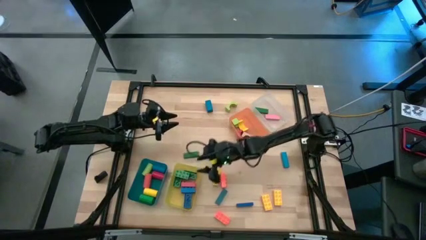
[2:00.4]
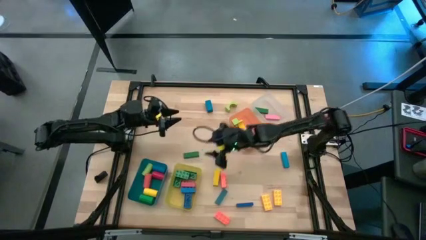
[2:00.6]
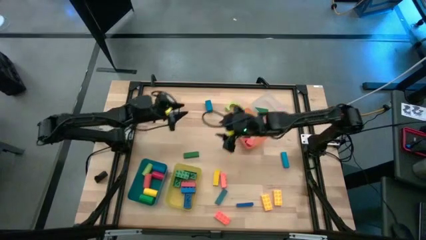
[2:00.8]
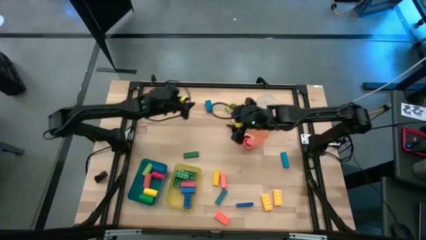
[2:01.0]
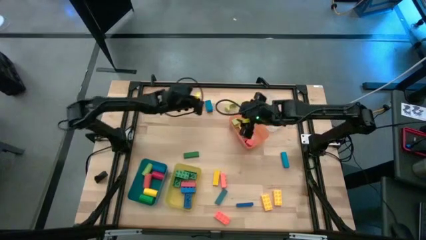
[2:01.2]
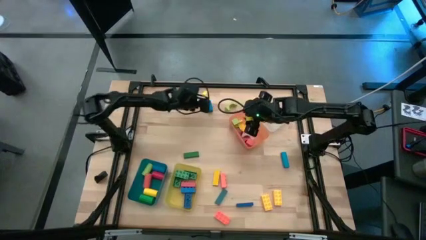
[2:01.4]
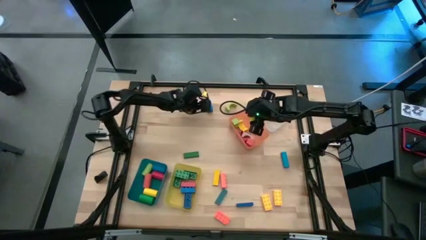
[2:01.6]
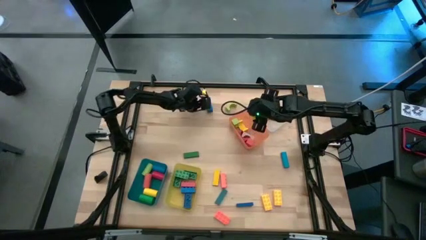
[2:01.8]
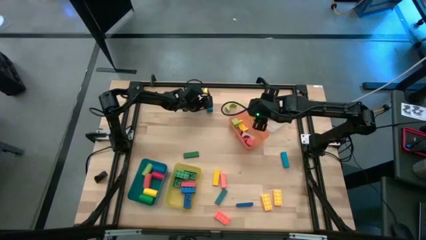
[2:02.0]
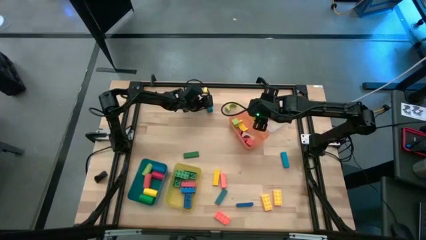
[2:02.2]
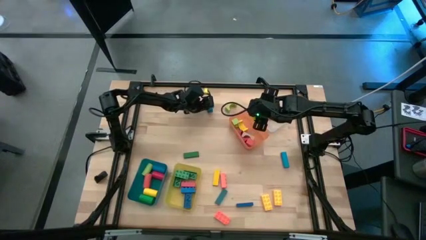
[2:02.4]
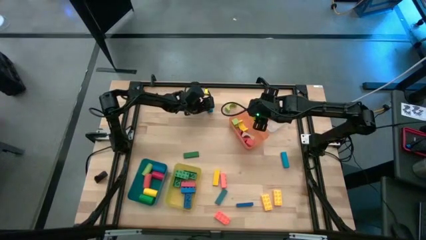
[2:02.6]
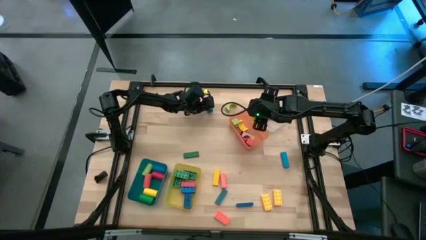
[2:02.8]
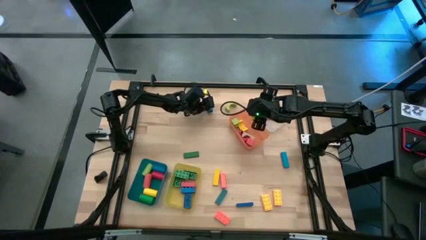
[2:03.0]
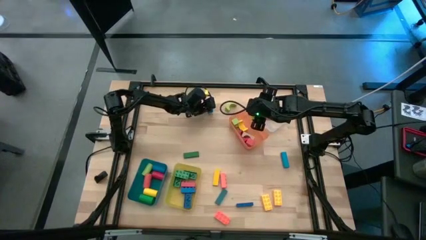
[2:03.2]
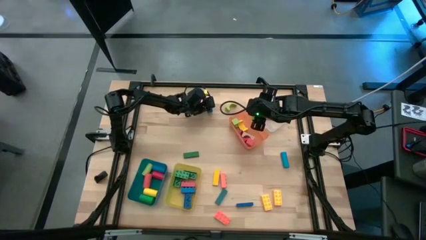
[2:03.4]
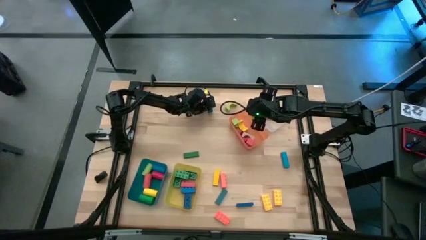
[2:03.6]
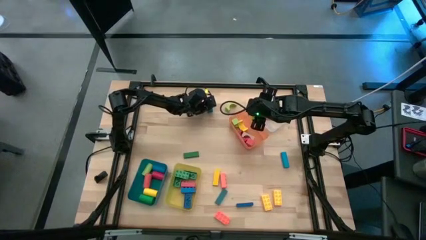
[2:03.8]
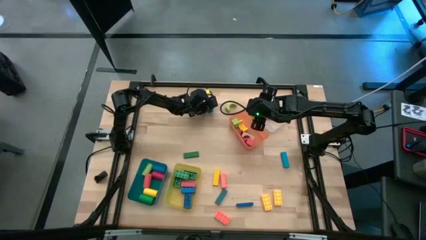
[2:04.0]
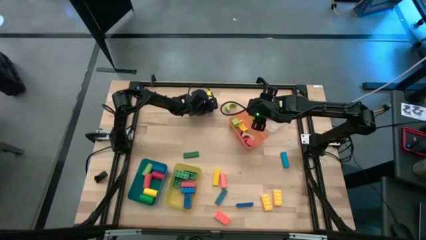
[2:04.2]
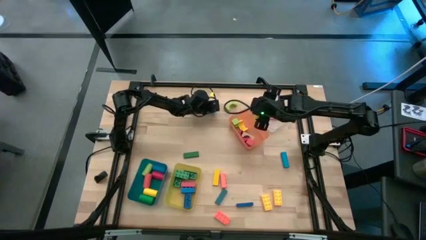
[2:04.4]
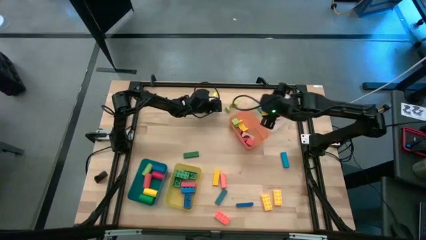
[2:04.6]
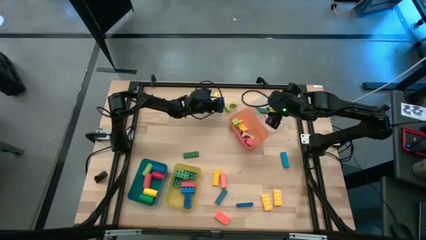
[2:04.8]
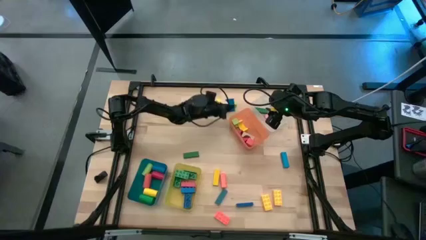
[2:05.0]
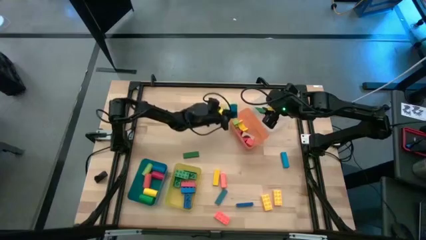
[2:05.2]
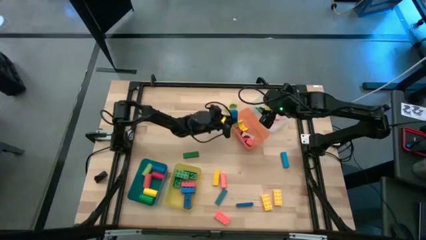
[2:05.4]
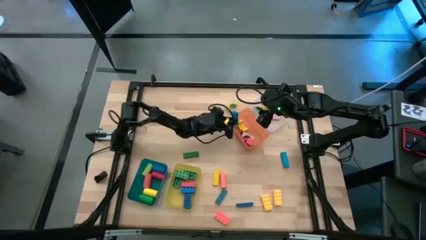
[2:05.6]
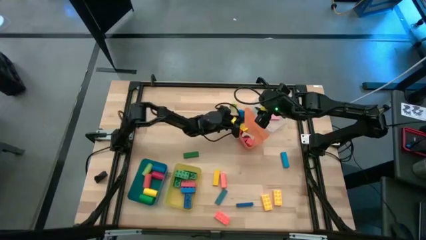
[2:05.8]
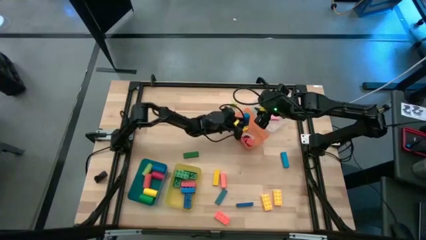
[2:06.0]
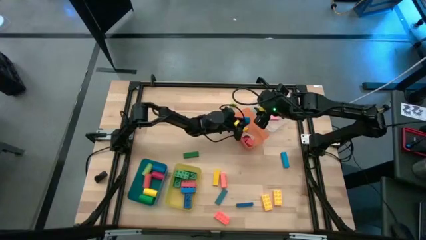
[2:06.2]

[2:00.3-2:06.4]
Task: Sort blocks by size
Put the blue arch block into the orange bin

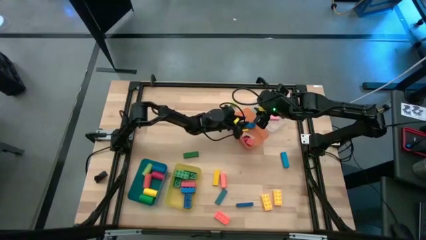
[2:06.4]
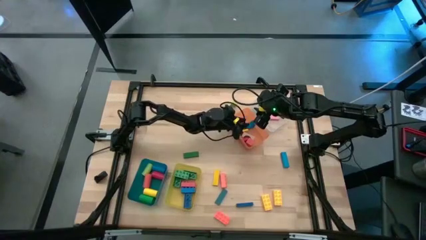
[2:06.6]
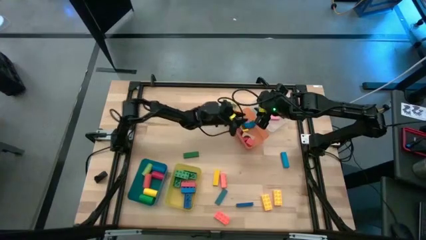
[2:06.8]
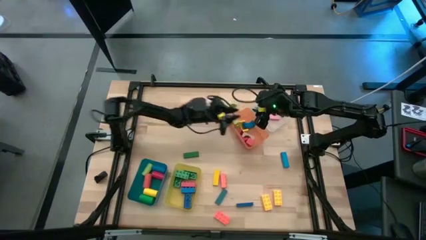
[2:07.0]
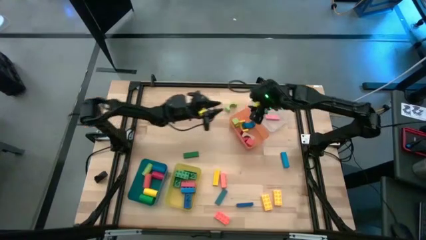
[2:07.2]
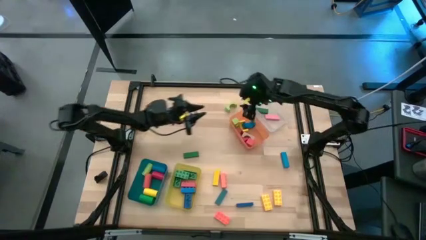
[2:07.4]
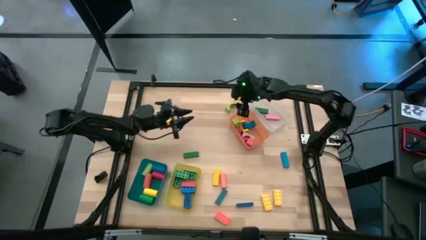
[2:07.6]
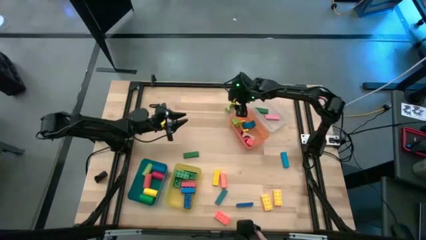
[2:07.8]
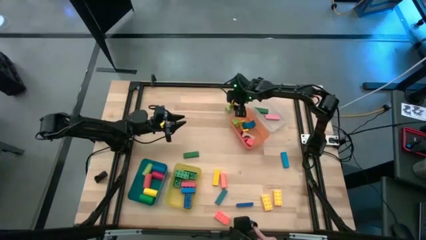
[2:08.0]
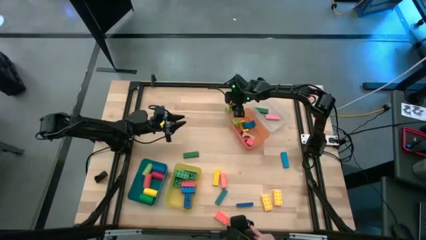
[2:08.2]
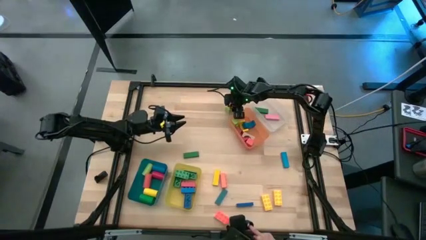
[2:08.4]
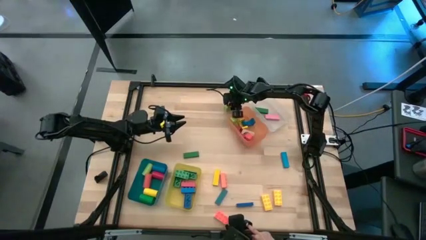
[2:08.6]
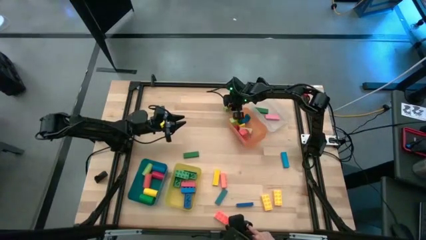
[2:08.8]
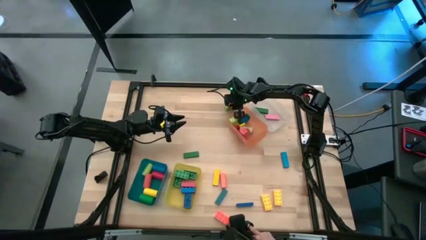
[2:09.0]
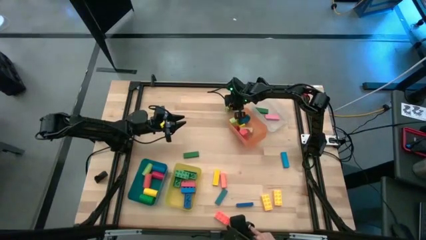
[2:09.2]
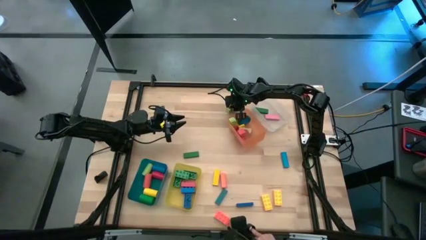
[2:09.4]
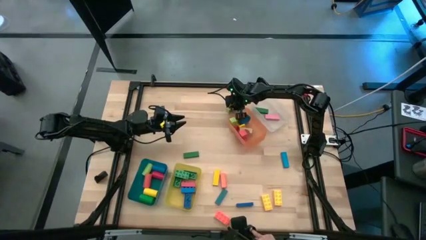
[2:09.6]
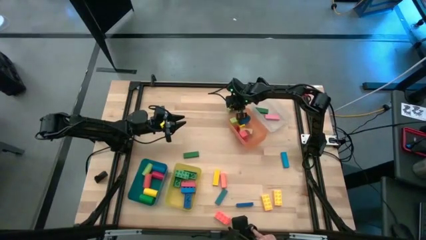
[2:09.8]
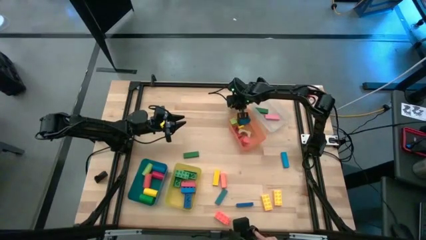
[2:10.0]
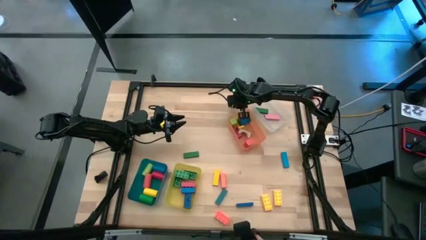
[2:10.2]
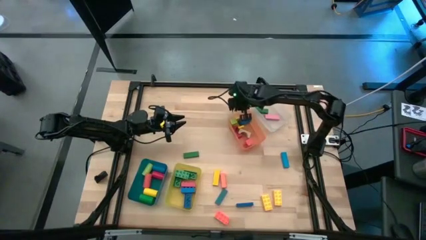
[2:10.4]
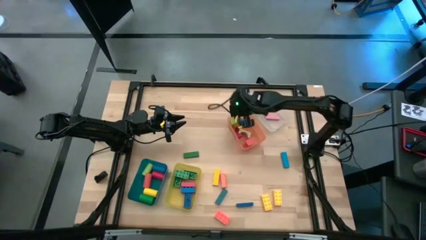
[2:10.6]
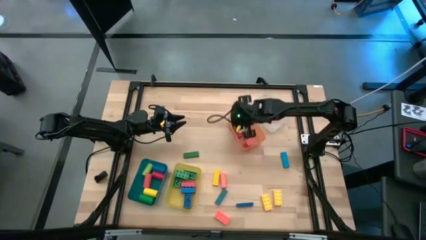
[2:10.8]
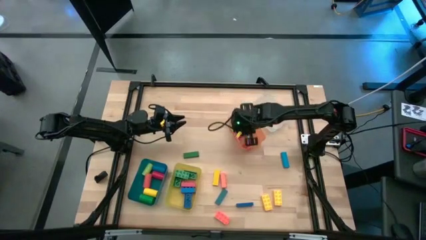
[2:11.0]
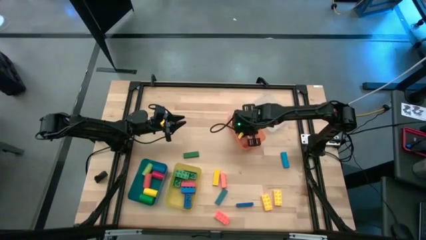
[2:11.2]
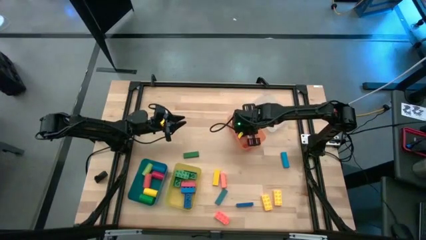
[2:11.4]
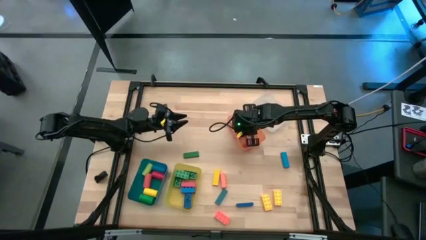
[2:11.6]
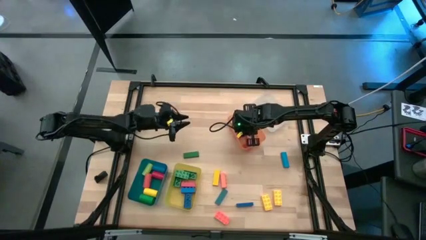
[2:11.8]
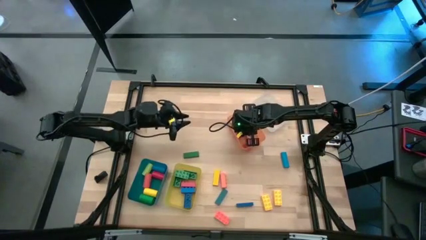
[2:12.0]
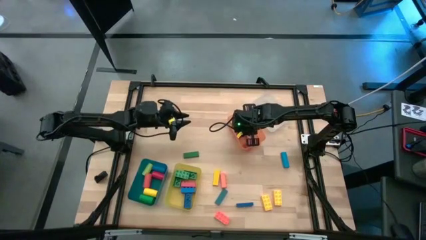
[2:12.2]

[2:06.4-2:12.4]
Put the light green arch block into the orange bin

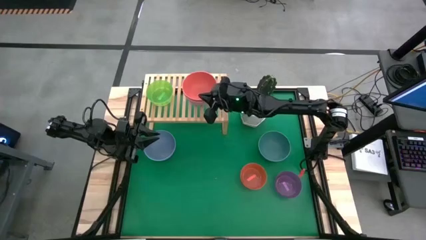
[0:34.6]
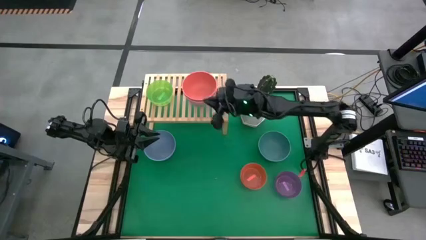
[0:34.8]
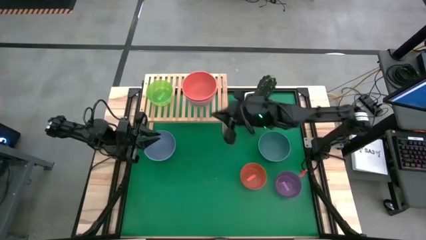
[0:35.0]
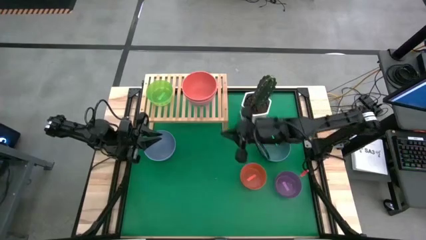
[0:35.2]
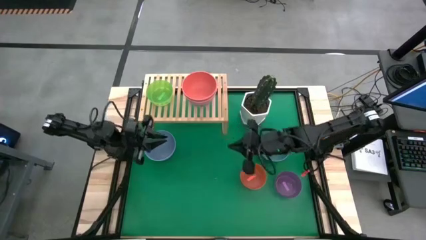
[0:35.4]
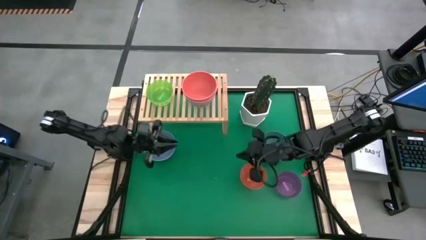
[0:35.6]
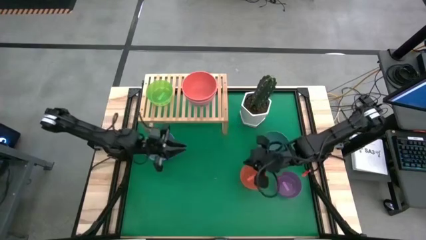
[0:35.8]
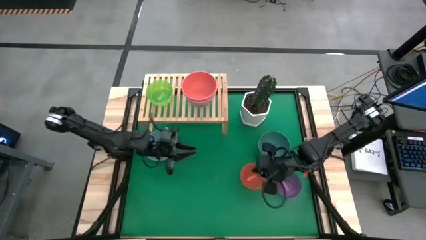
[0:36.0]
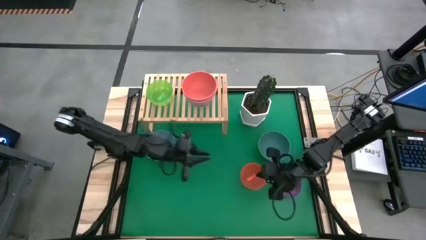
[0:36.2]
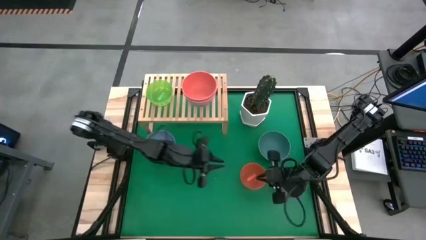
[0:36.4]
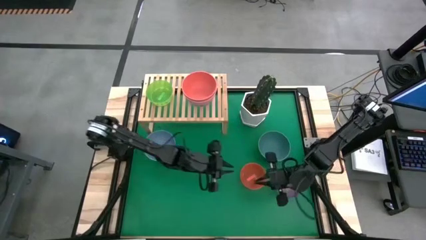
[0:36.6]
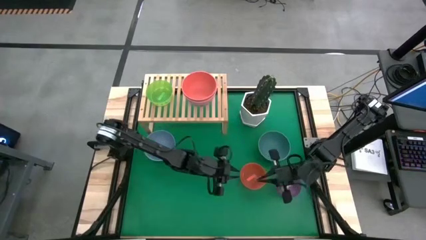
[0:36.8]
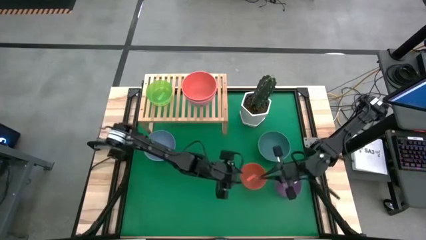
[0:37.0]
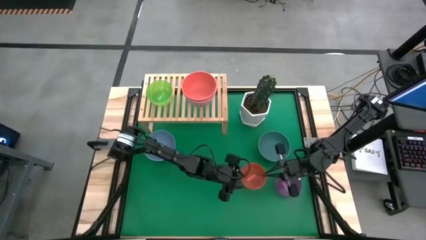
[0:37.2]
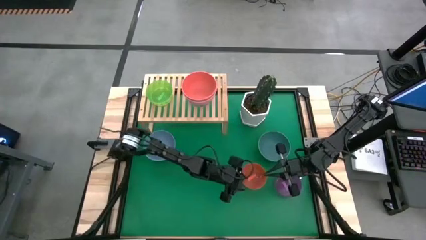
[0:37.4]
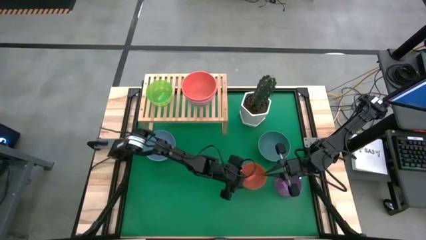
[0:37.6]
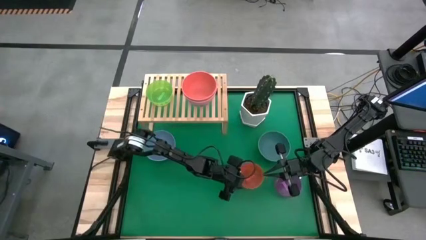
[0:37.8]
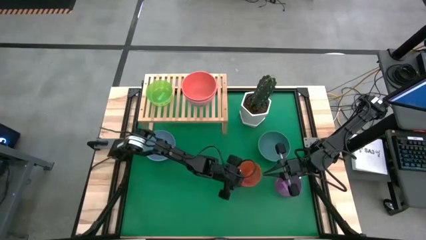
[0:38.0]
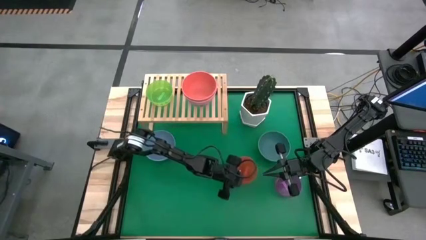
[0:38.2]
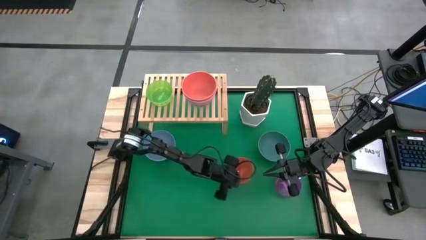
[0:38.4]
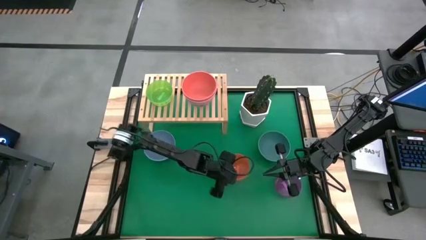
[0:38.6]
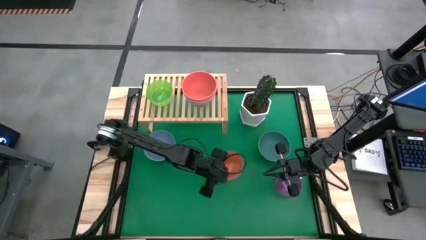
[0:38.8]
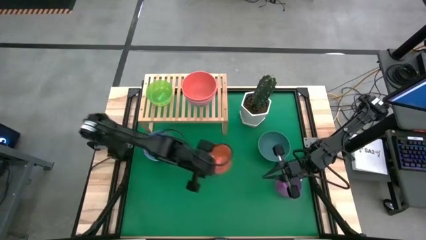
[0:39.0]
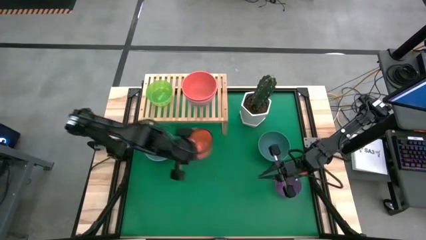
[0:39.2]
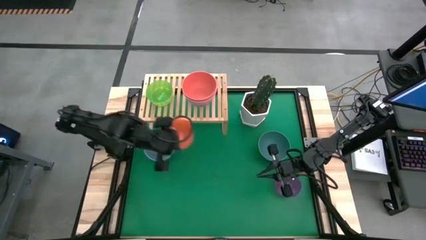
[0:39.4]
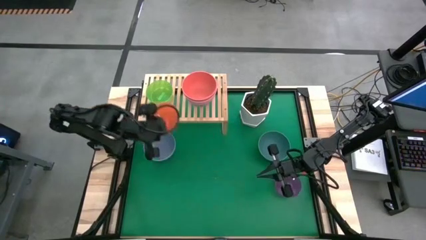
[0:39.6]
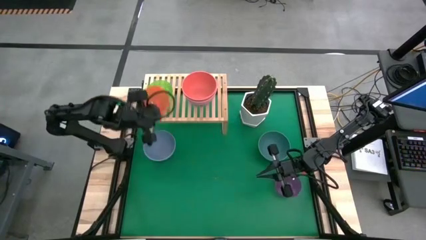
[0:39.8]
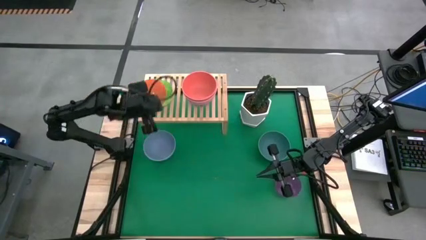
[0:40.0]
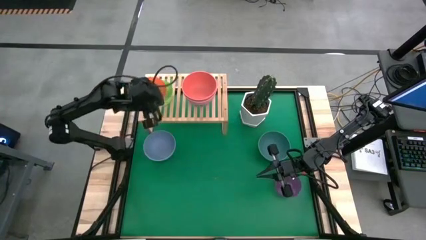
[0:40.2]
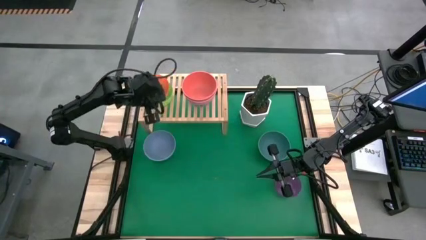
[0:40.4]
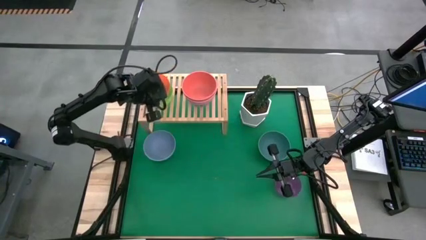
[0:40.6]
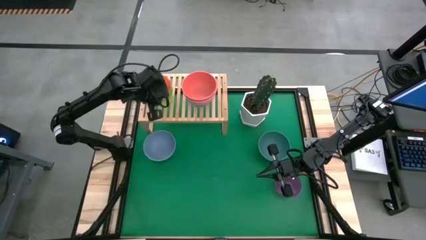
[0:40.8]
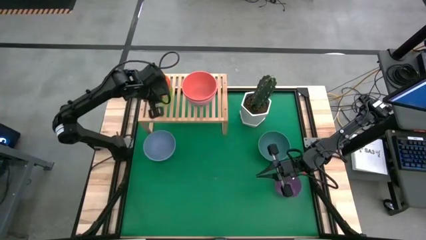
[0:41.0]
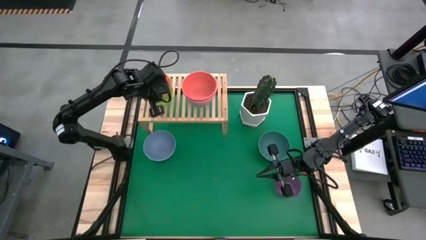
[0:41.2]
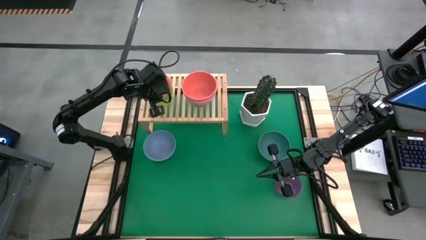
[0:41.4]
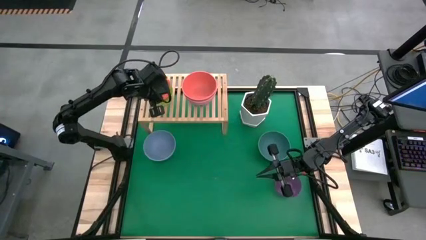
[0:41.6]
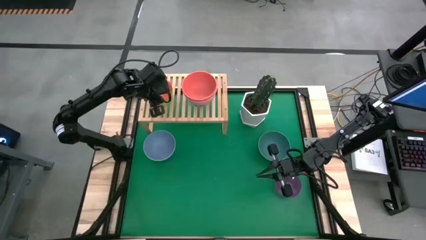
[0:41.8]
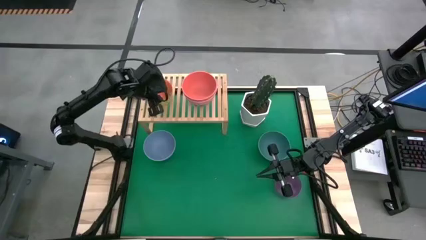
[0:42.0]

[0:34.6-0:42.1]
Task: Place and stack bowls onto a shelf
Stack the orange transparent bowl on top of the green transparent bowl on the shelf
